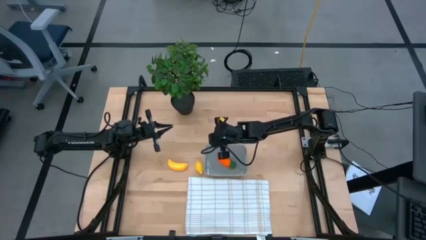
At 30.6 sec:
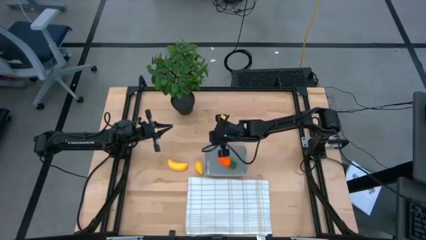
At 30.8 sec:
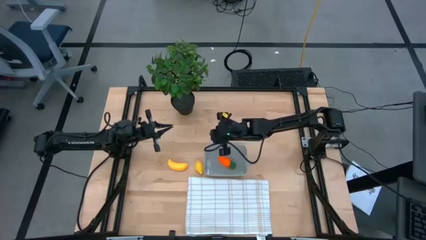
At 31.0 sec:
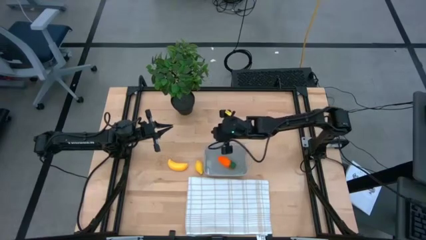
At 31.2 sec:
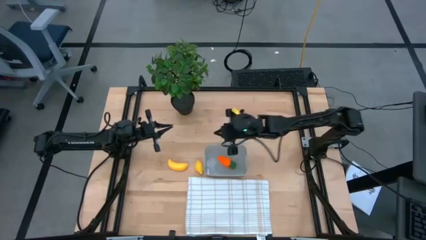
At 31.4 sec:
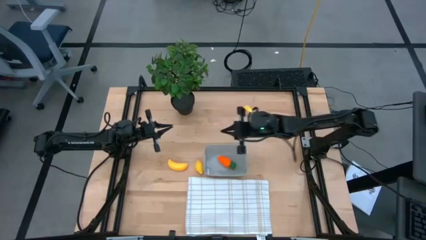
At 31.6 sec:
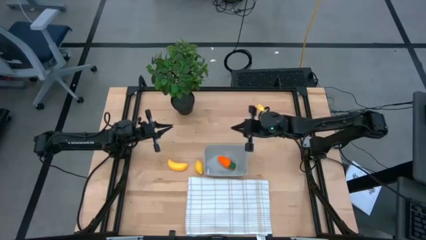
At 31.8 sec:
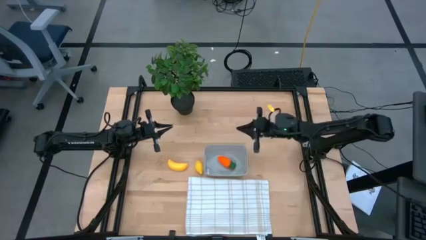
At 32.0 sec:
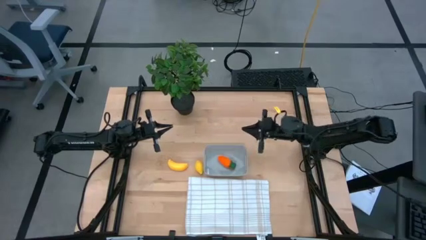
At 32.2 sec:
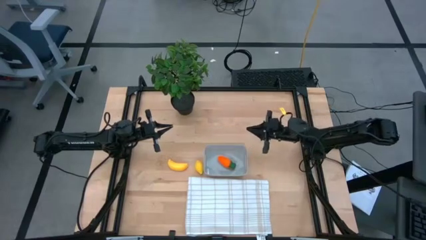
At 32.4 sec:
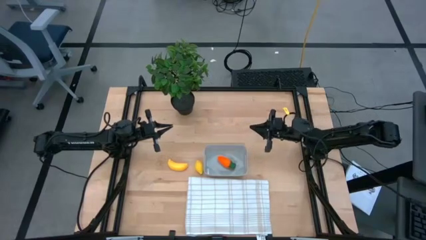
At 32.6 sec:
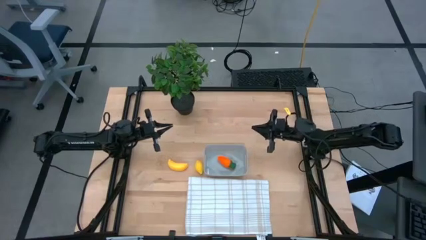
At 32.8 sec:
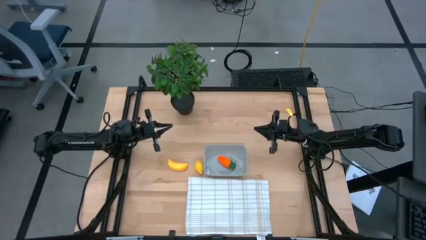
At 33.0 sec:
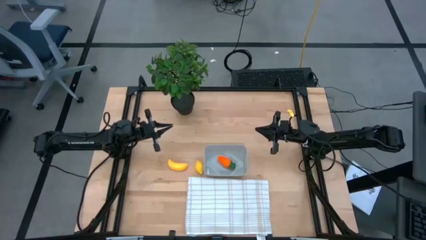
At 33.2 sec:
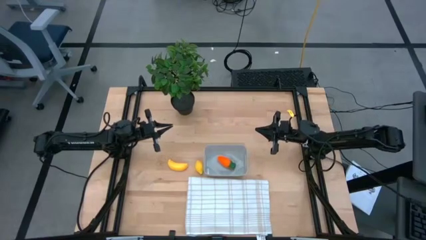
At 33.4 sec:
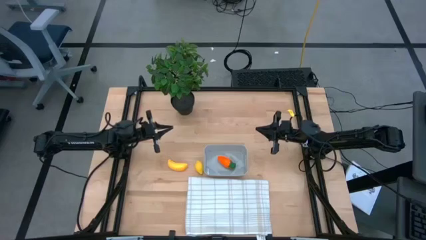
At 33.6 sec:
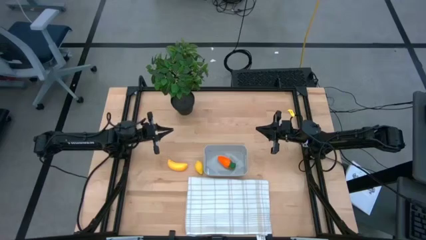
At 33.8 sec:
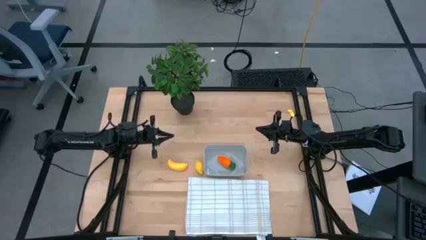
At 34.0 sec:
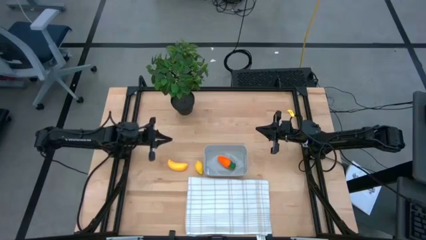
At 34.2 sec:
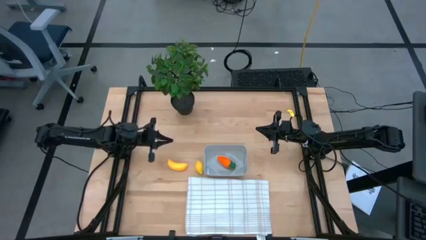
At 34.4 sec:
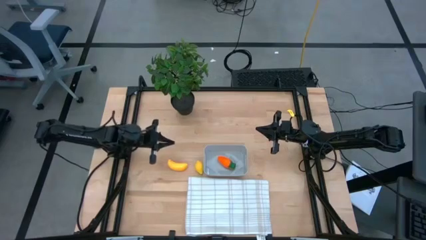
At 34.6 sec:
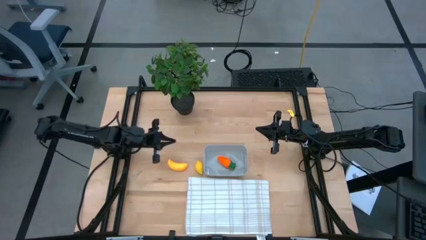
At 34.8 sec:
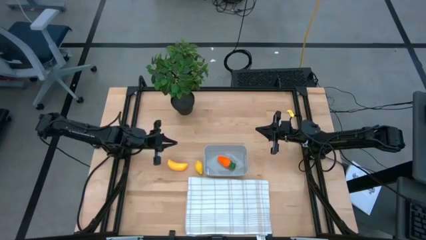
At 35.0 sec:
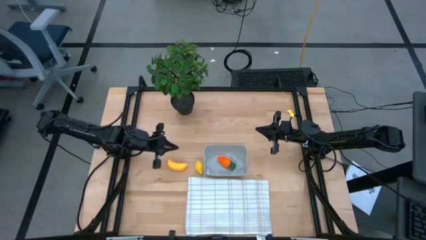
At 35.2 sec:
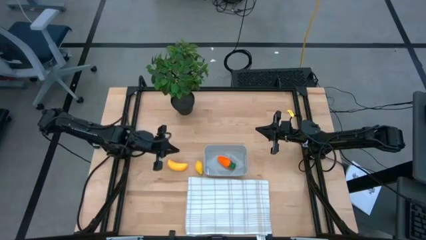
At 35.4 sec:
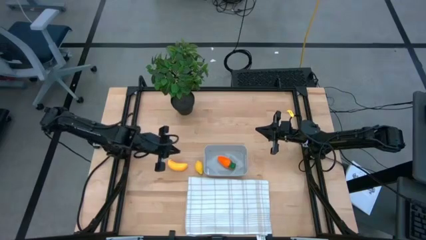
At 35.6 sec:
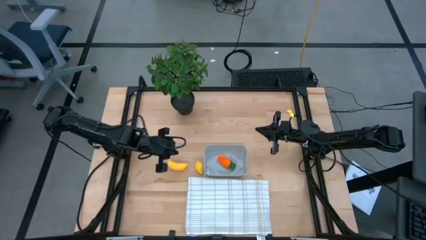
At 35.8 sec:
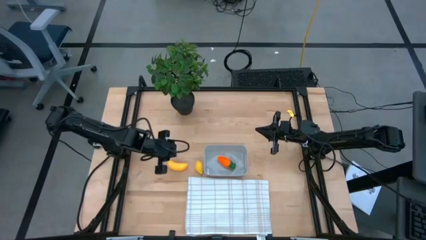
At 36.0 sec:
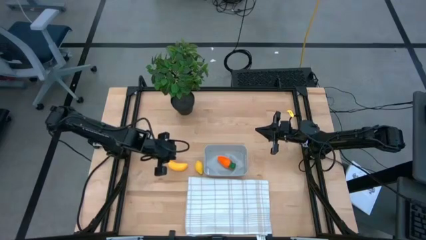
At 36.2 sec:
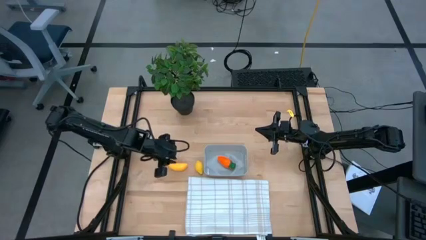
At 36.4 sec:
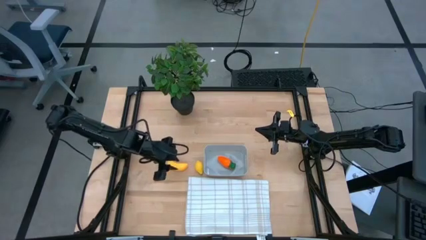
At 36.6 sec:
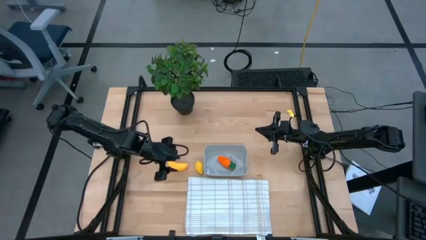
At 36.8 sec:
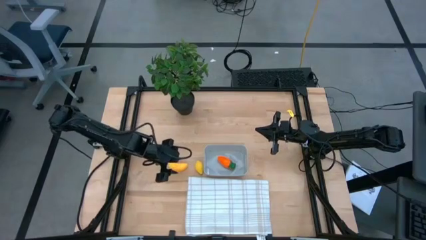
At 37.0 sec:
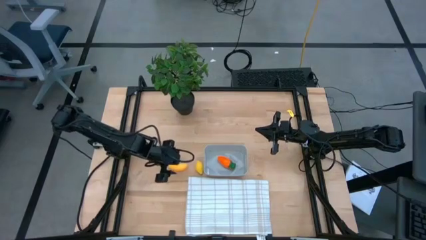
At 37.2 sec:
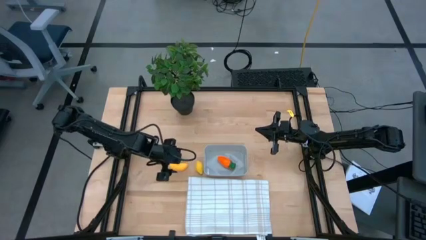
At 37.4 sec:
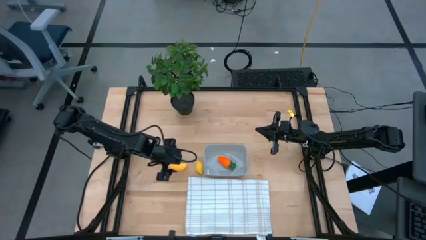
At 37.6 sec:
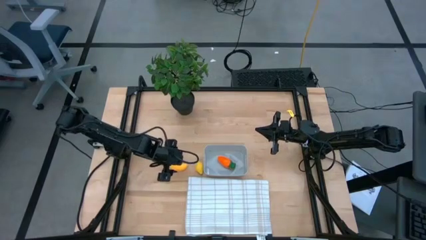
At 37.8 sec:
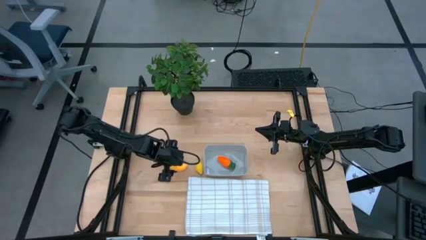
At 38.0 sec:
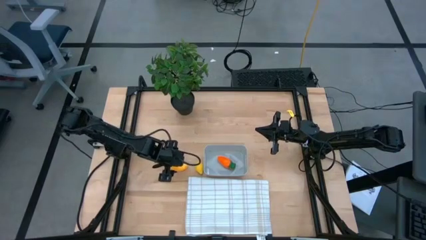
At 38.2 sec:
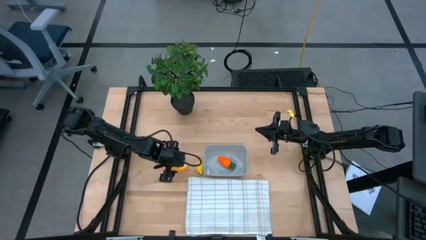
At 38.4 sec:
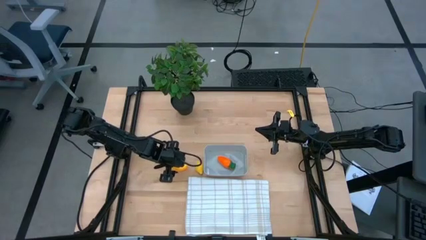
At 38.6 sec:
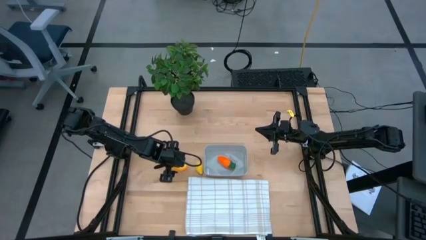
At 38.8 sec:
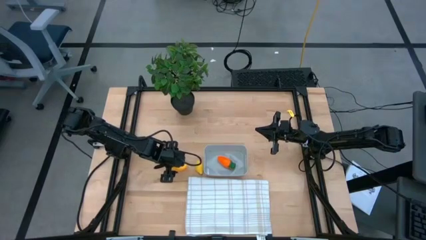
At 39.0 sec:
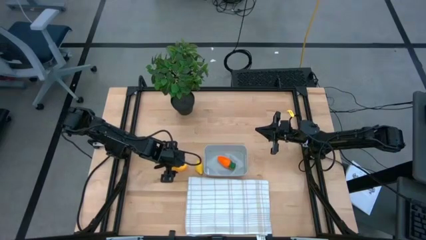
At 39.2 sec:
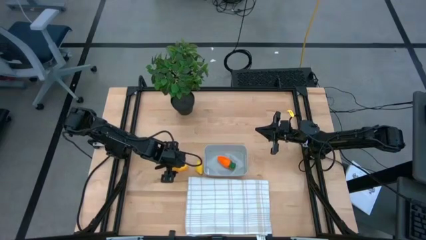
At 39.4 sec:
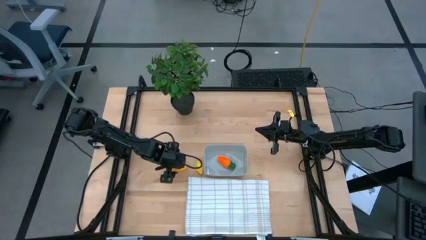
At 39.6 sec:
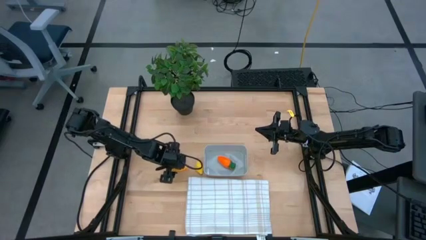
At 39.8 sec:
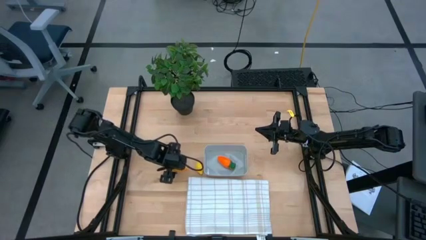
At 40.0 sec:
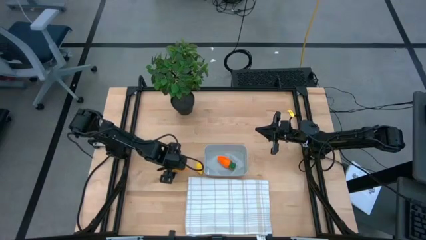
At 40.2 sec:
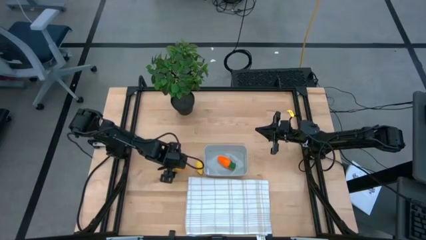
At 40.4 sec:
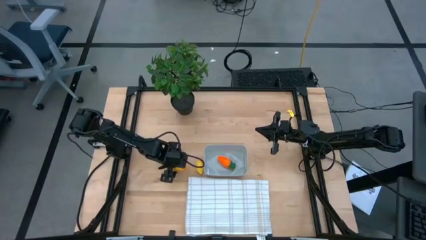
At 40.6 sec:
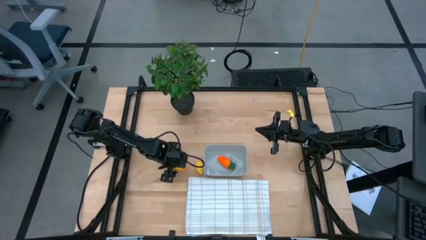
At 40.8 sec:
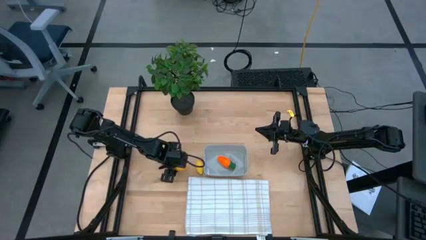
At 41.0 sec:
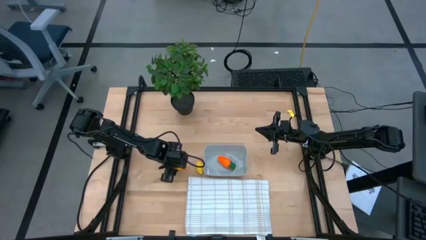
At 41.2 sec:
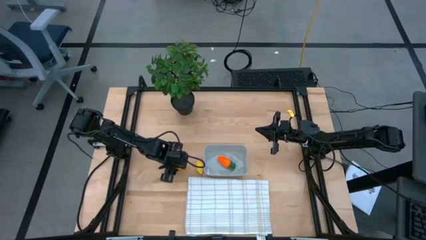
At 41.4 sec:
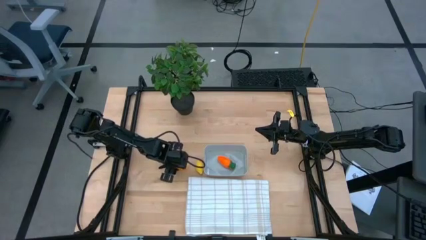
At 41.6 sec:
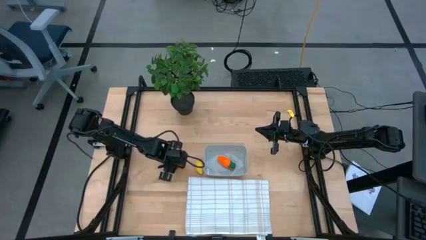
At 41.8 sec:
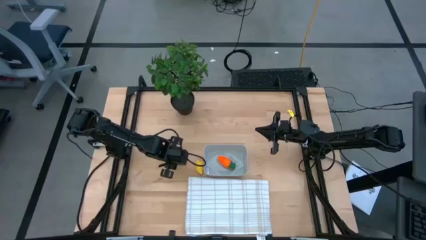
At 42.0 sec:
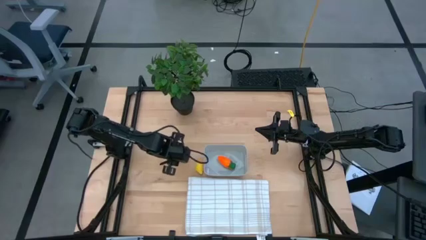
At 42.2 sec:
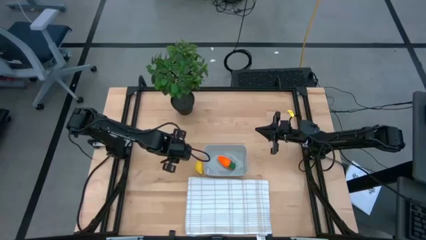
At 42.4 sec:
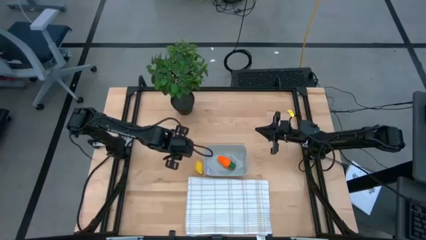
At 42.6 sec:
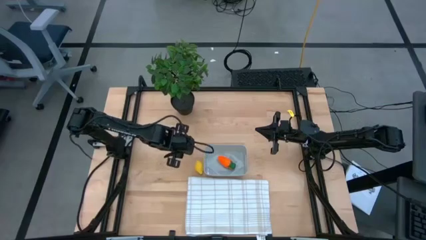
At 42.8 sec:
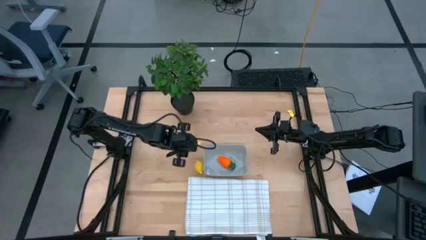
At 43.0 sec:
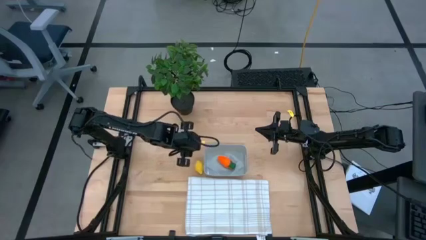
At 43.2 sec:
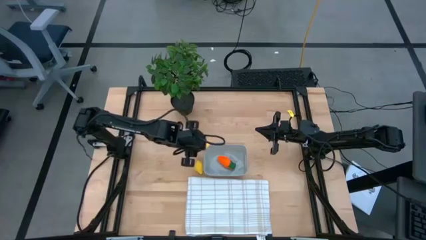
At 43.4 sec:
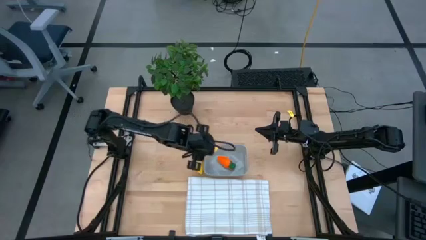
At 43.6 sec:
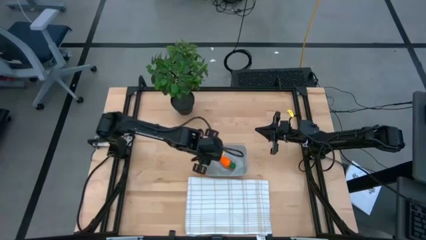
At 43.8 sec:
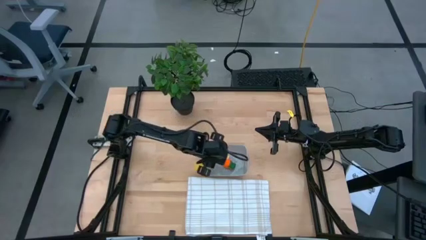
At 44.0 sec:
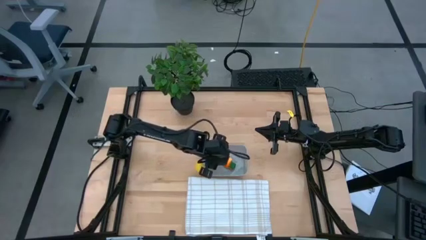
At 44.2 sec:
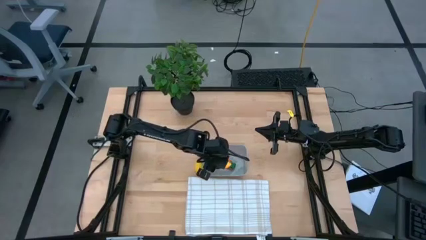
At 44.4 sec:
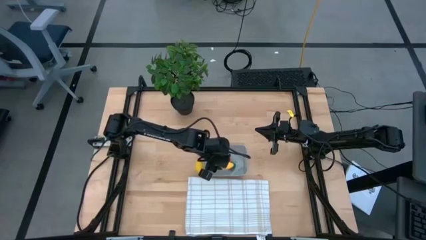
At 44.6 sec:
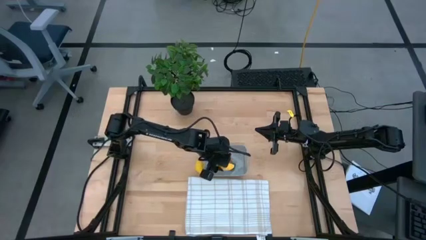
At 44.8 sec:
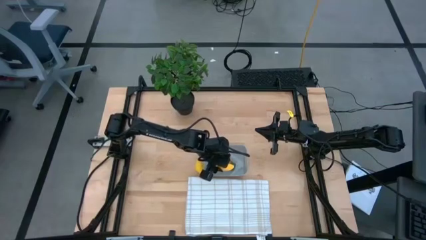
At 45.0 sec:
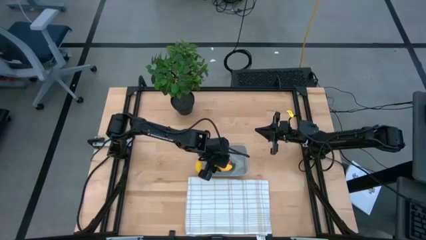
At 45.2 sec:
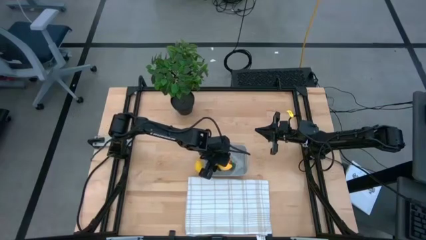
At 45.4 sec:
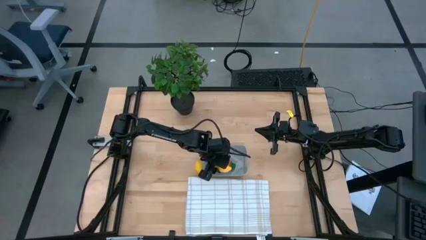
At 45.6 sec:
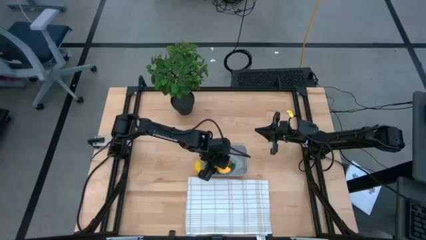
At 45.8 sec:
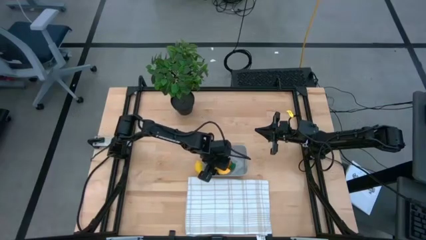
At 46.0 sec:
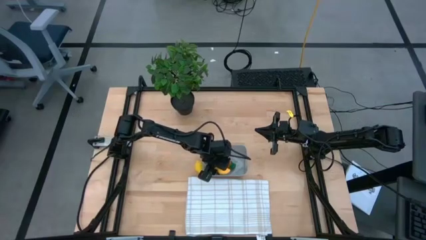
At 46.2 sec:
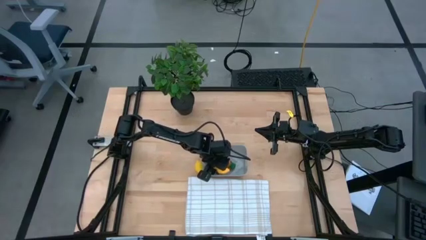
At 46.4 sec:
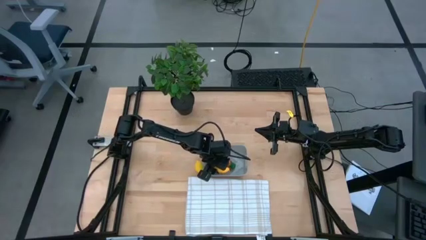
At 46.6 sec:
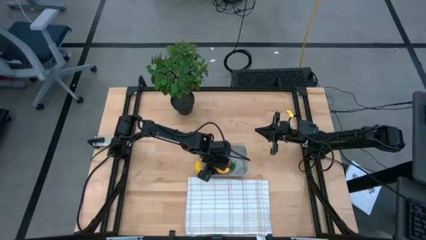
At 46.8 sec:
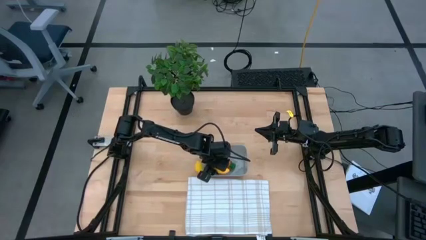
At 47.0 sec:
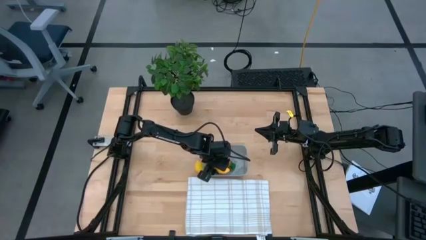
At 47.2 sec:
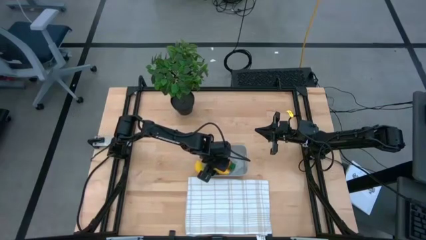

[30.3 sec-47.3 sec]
Task: Pick and placing Produce into tupperware
Put the banana into the gray bin
